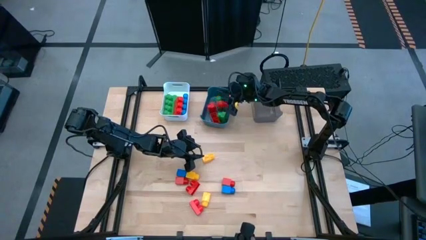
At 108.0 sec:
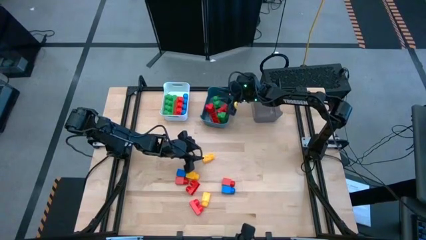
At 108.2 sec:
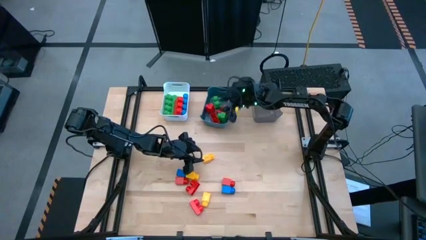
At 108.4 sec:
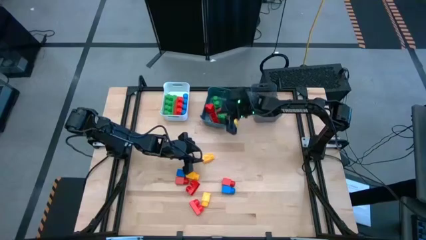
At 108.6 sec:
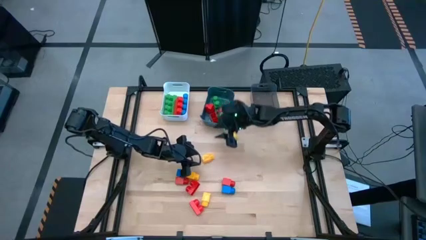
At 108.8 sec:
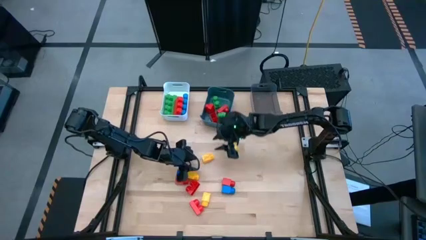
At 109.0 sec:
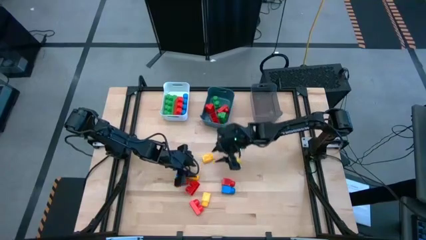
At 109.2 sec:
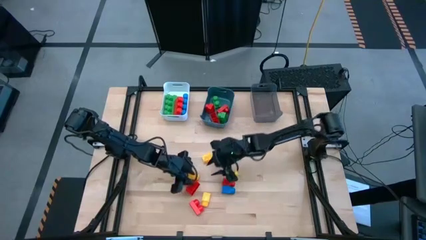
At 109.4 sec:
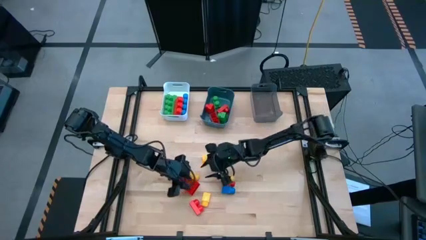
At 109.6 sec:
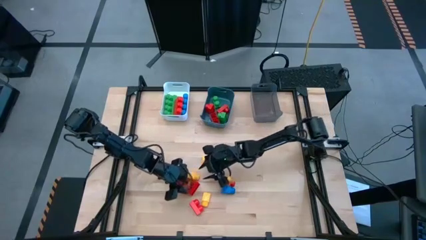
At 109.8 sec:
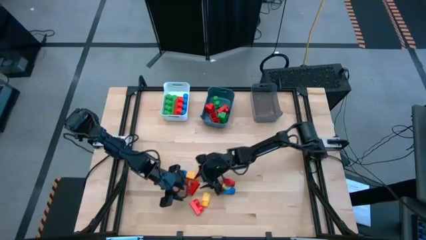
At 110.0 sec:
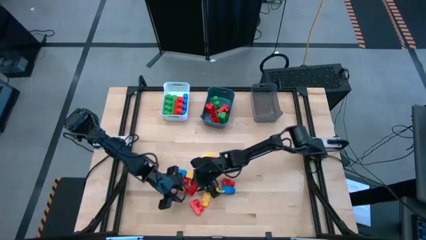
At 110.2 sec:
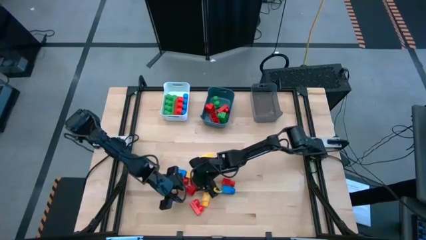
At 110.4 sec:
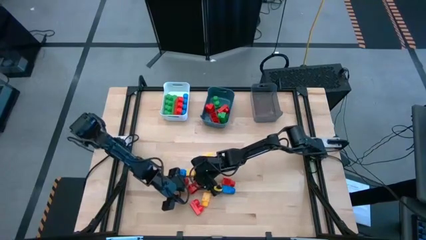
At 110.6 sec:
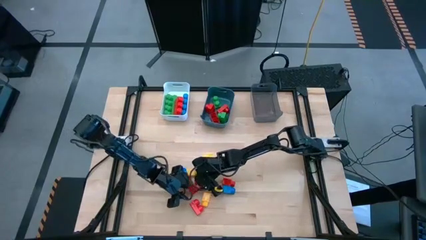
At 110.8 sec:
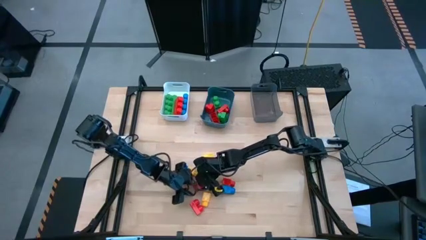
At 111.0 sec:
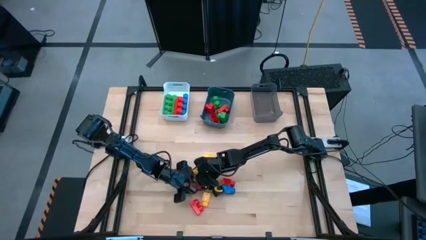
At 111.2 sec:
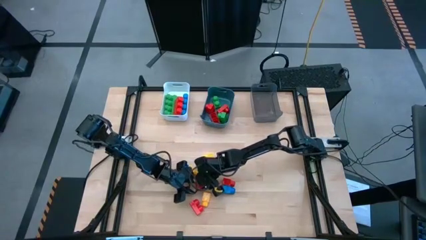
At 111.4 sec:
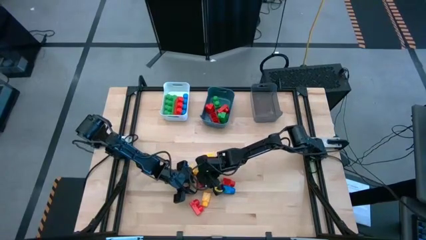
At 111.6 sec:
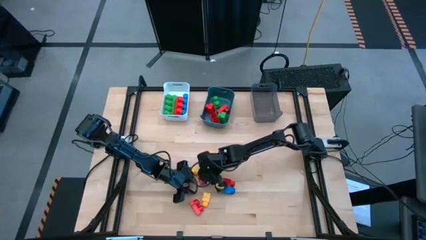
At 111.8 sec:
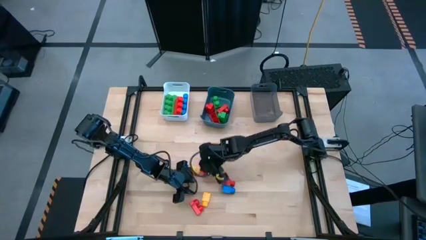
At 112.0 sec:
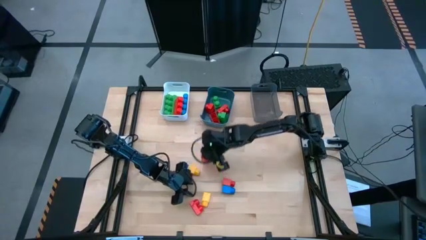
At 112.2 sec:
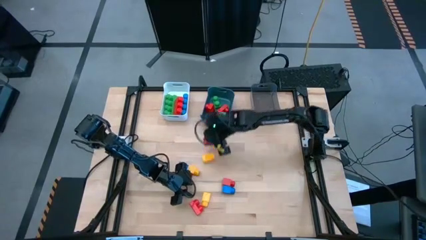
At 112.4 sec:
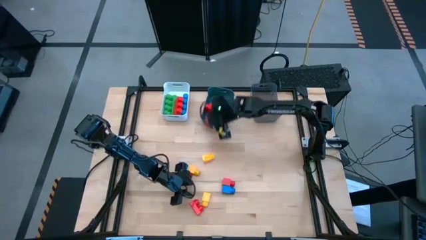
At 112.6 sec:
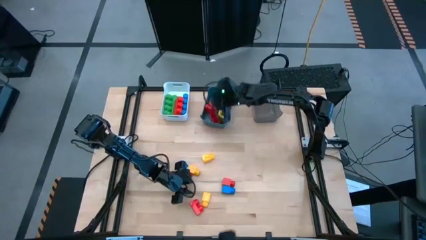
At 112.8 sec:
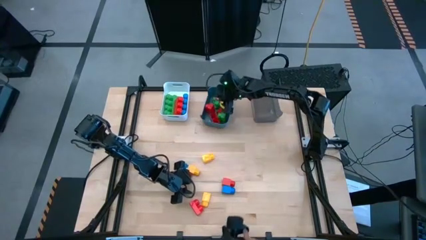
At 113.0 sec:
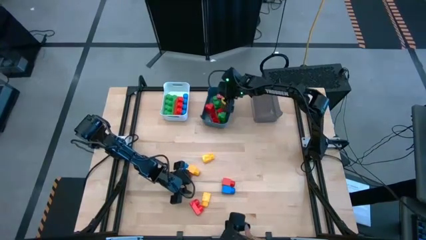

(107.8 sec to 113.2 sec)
Task: Sort blocks by size
Put the 2 studs red game piece into the blue bin

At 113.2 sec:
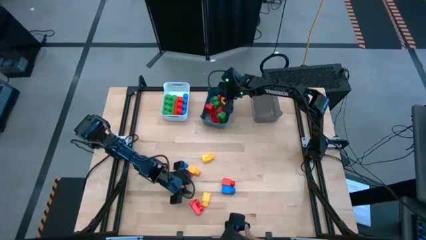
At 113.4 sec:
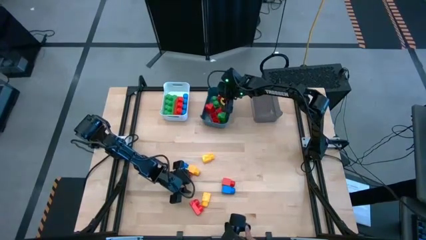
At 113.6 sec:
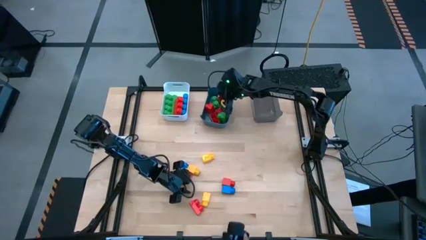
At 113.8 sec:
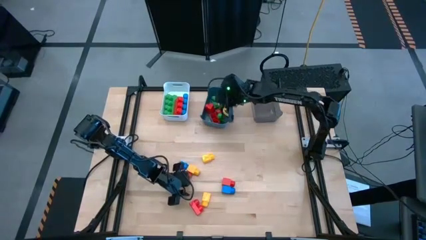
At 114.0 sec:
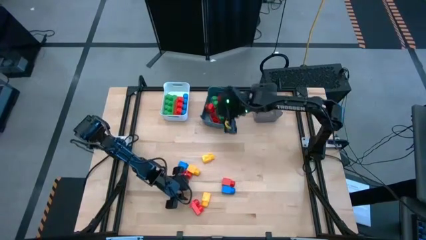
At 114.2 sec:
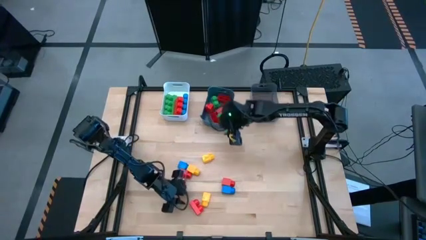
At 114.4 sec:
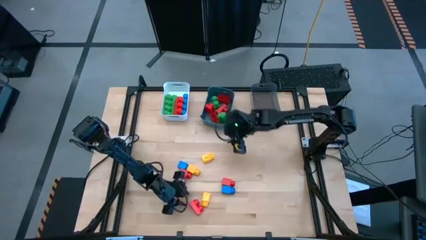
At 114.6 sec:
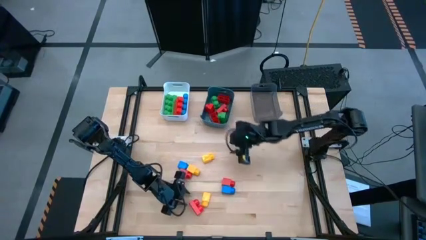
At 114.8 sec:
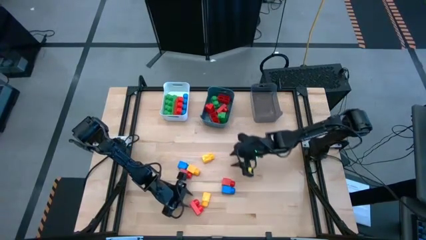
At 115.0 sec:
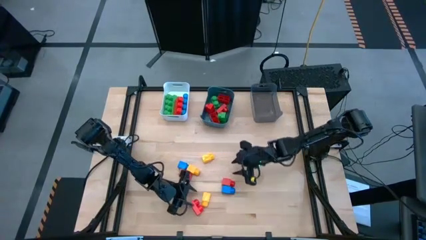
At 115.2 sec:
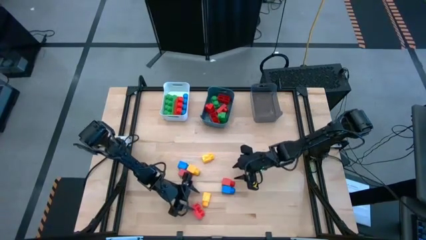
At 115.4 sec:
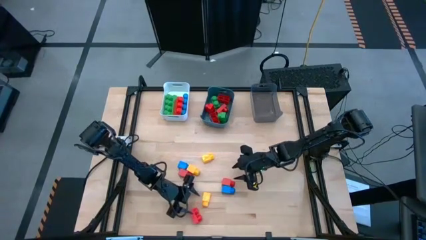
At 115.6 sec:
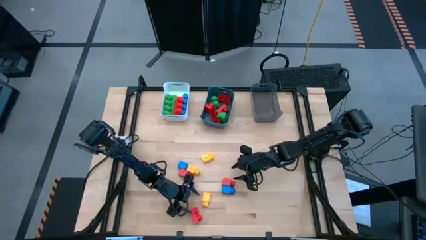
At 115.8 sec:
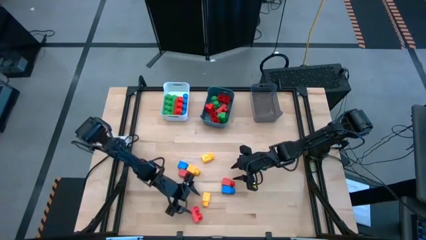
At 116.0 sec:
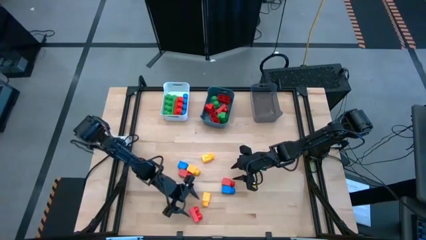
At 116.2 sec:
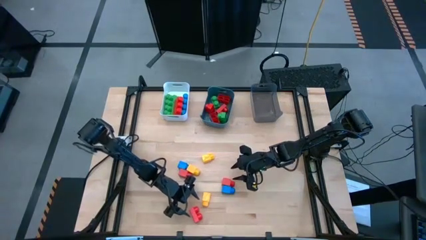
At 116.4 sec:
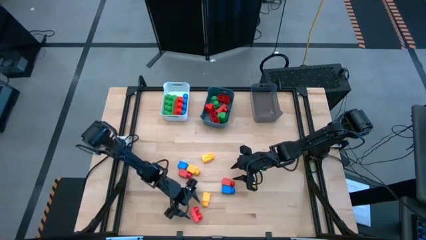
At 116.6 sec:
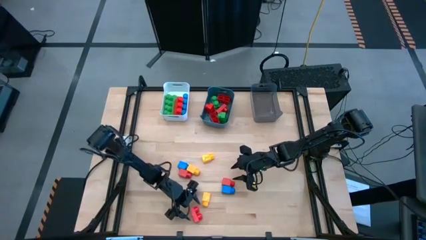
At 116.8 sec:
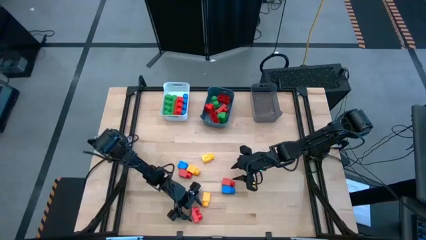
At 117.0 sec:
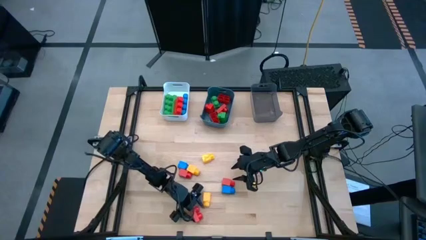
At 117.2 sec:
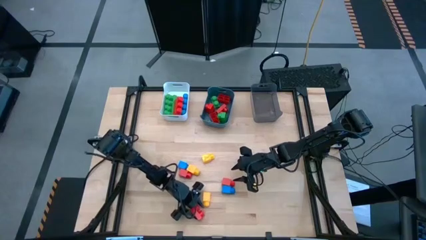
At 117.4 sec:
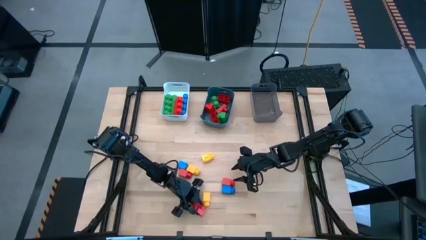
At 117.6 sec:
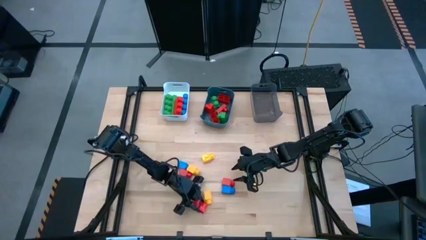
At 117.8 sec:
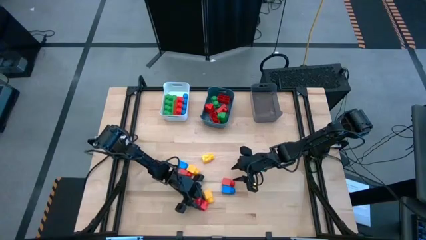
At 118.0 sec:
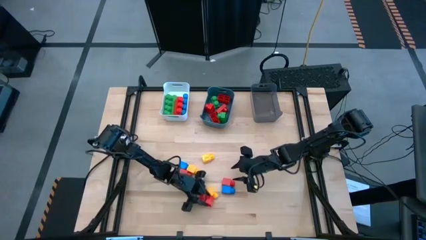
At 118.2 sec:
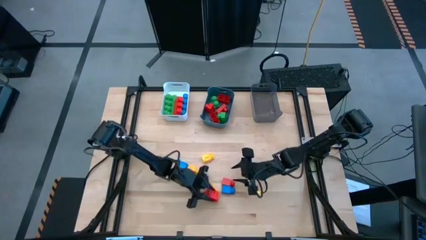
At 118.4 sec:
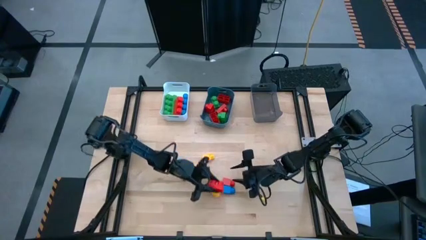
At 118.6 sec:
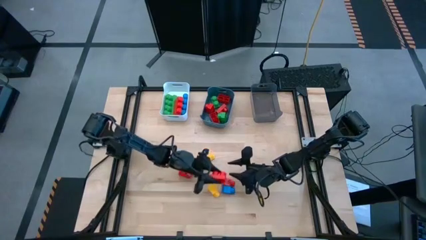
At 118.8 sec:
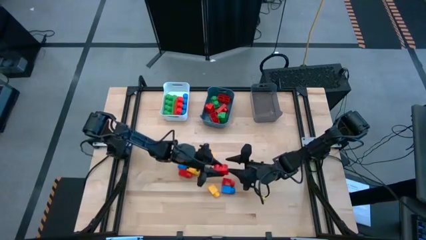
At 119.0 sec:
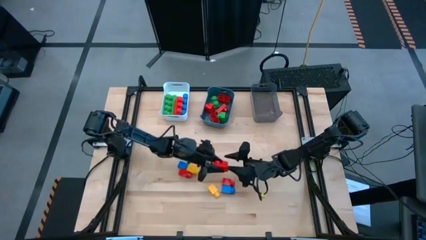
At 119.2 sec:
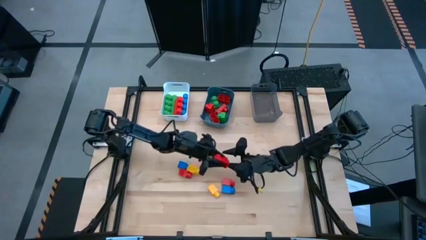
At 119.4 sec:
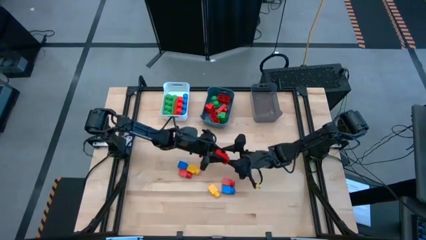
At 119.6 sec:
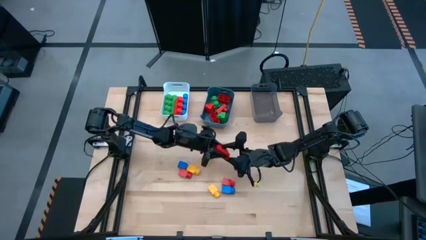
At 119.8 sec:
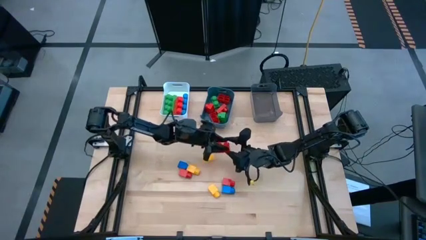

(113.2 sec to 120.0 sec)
Put the 2 studs red game piece into the blue bin

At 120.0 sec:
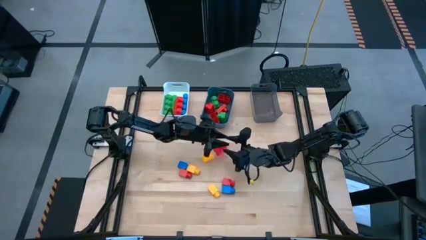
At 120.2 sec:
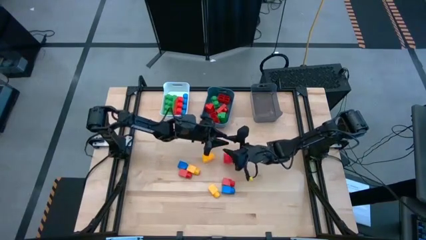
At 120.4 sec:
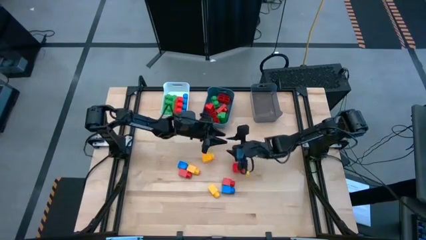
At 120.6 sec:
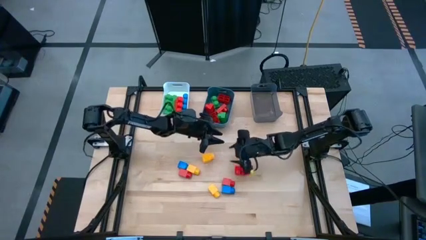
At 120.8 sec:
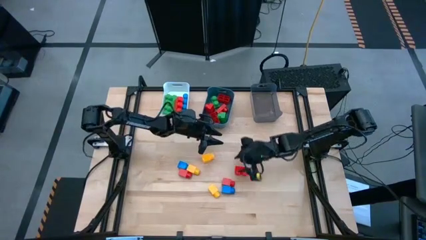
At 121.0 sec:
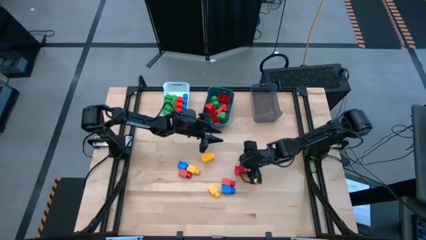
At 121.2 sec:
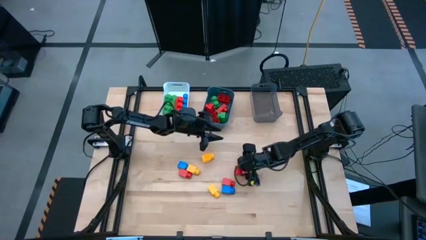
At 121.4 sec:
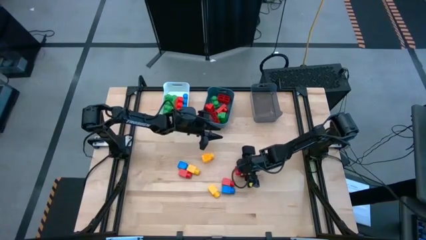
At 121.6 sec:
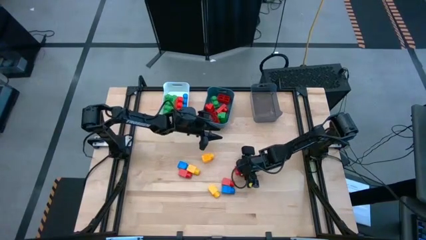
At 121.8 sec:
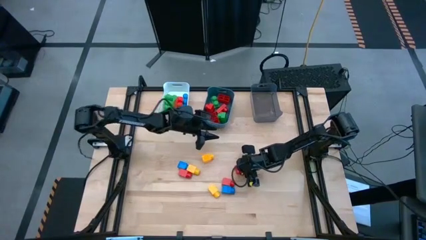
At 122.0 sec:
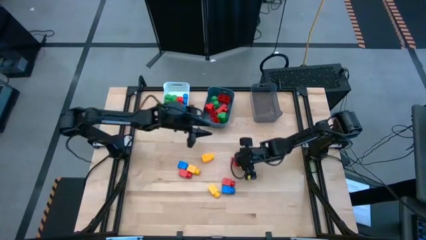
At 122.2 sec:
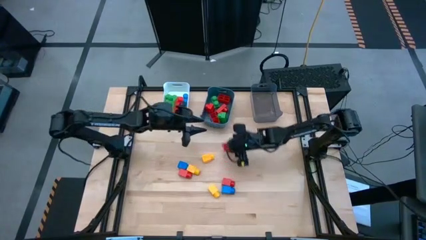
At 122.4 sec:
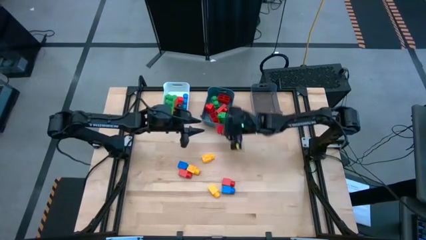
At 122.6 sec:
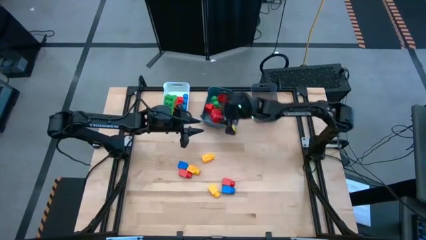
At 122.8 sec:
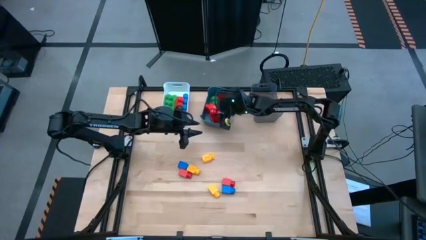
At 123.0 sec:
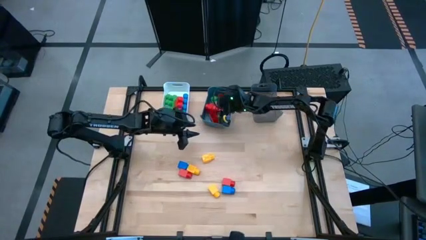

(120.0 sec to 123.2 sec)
Put the 2 studs red game piece into the blue bin

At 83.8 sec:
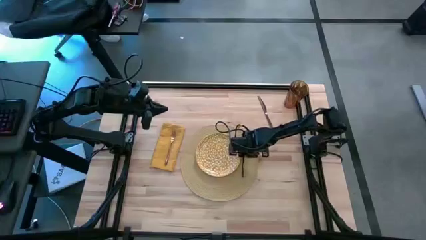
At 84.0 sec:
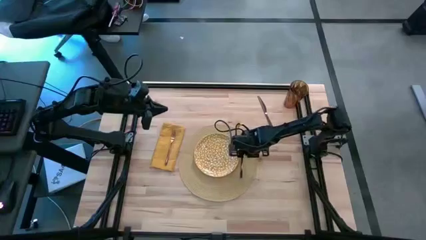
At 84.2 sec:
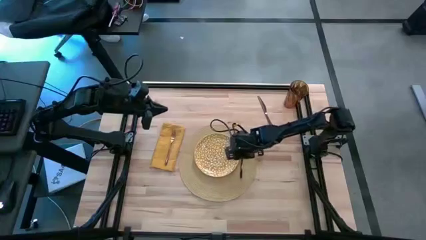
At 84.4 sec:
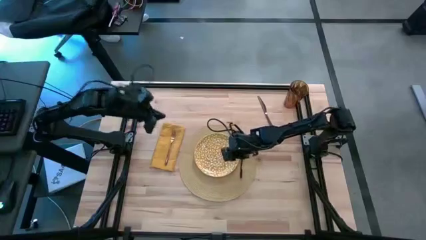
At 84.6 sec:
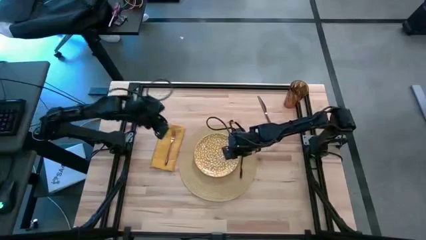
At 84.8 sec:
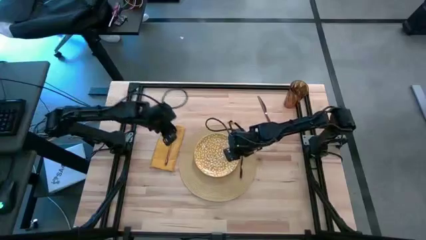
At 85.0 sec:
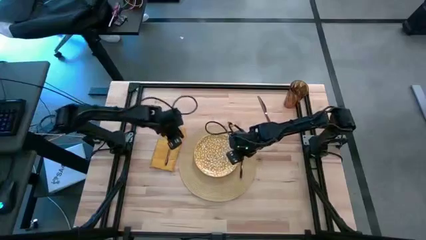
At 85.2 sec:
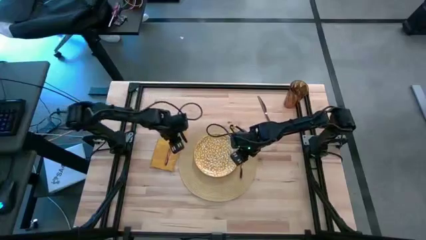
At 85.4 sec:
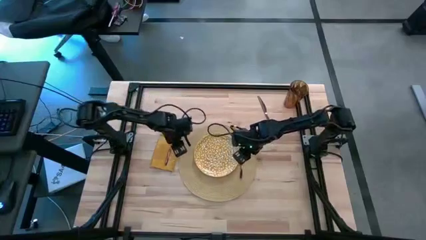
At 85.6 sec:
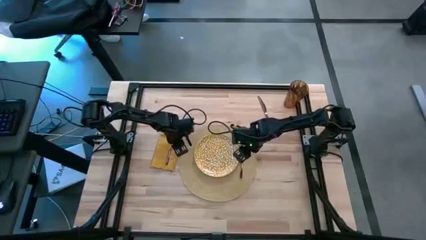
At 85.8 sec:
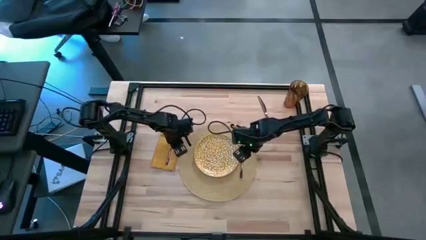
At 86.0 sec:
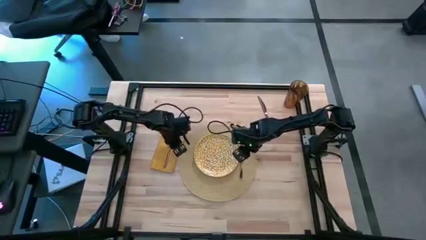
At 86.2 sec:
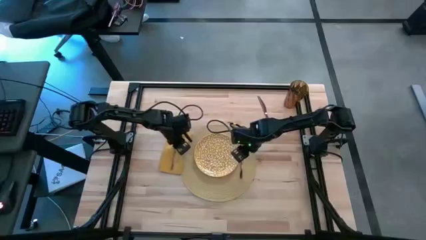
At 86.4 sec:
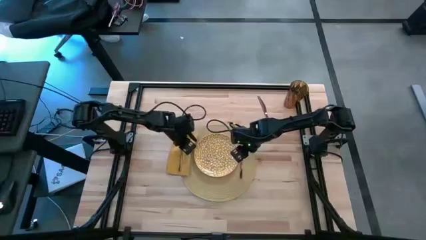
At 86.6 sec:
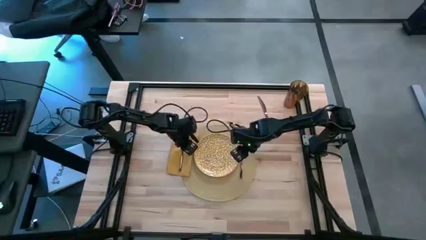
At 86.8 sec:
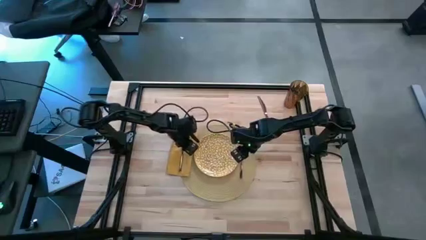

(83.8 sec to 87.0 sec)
Task: Set table place
Adjust the yellow napkin
